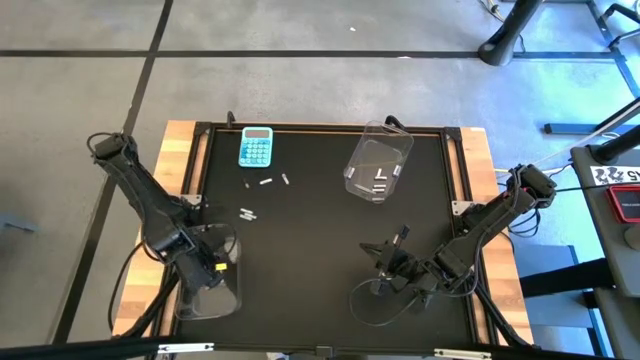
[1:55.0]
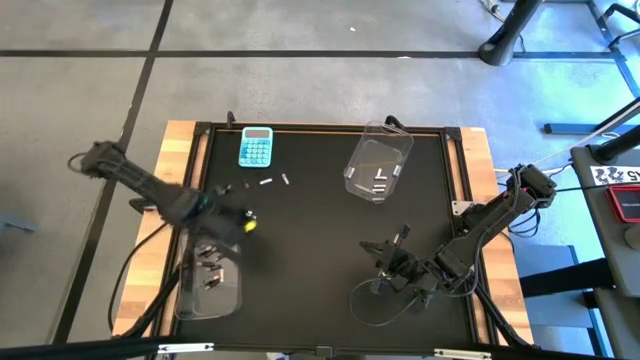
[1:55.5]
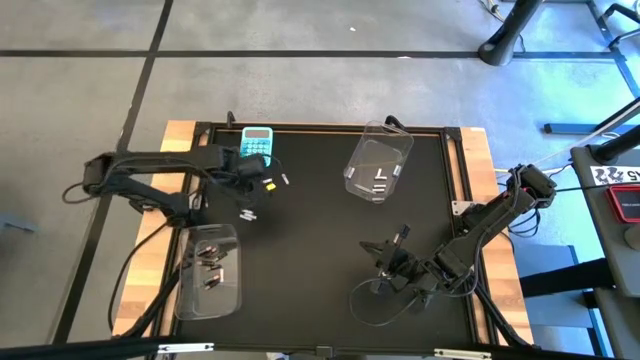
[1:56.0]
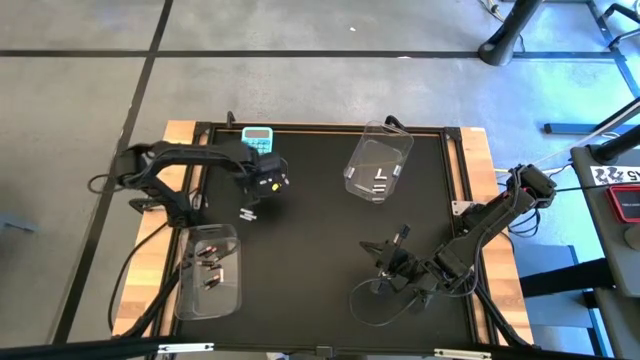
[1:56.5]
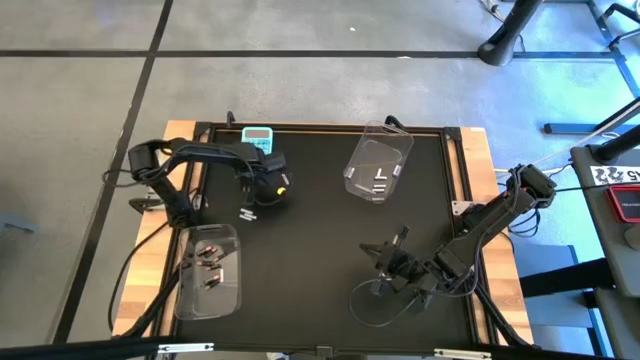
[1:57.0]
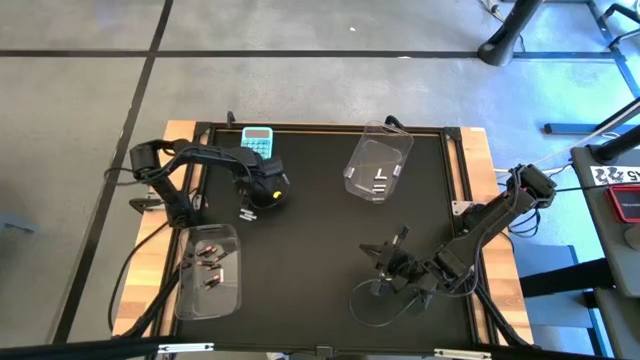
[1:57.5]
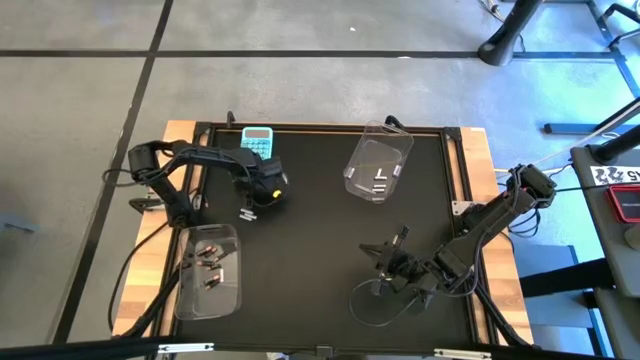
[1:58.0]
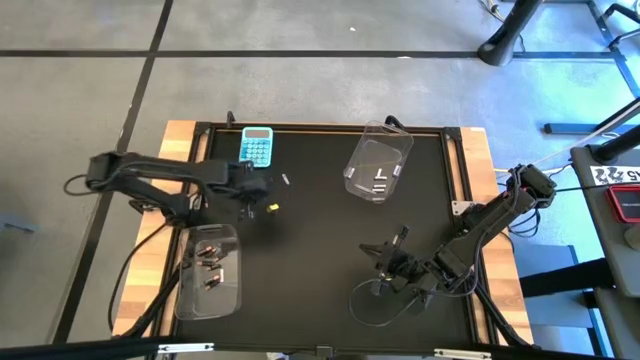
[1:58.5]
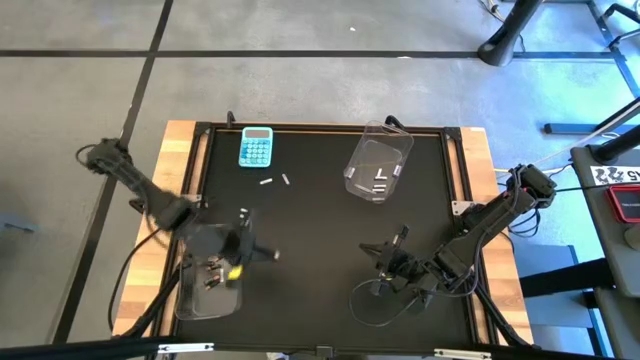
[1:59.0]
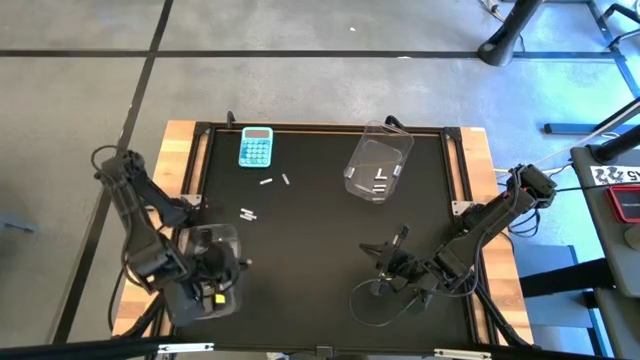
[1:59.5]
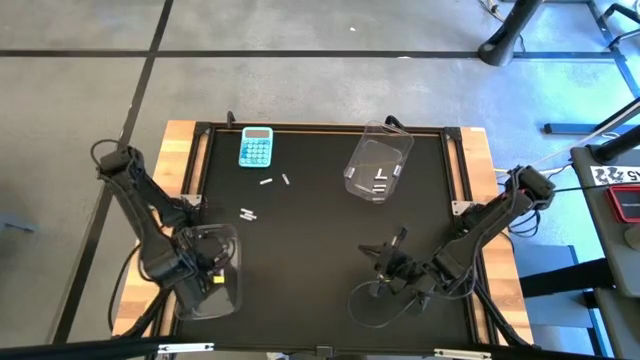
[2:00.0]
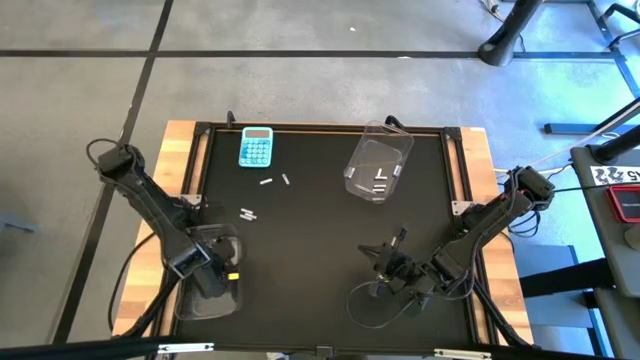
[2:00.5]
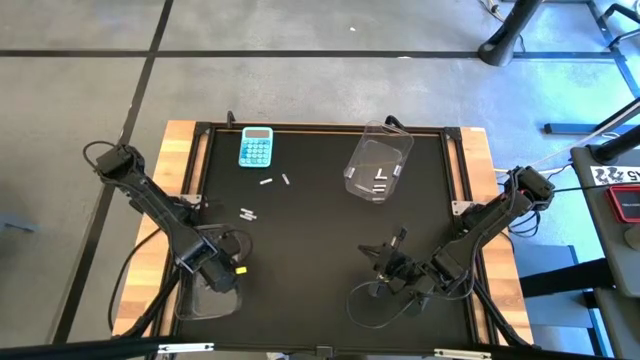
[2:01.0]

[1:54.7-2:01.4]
Task: Sort batteries
Put the black battery into the bottom transparent bin

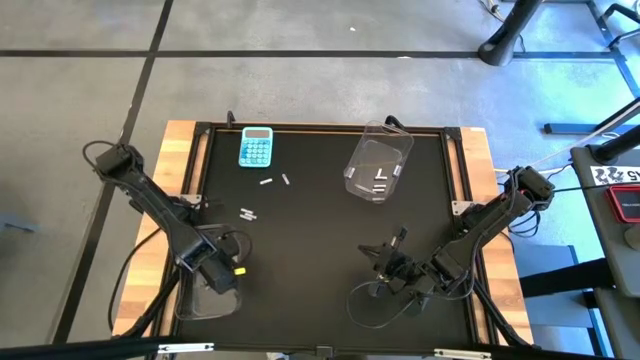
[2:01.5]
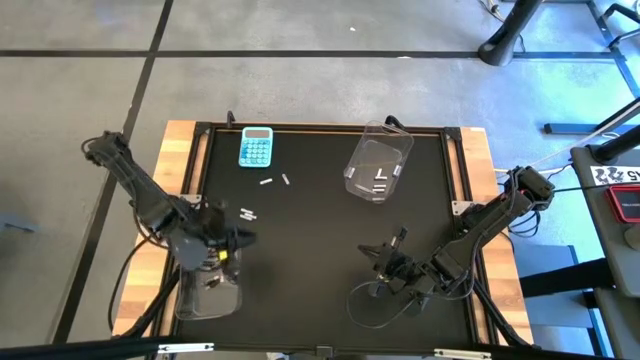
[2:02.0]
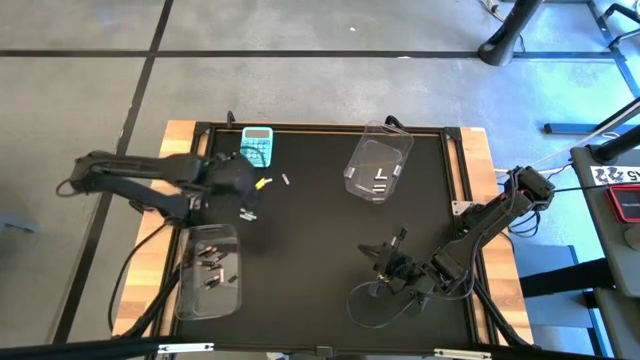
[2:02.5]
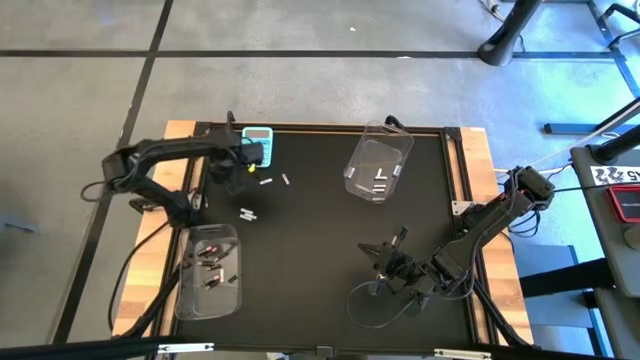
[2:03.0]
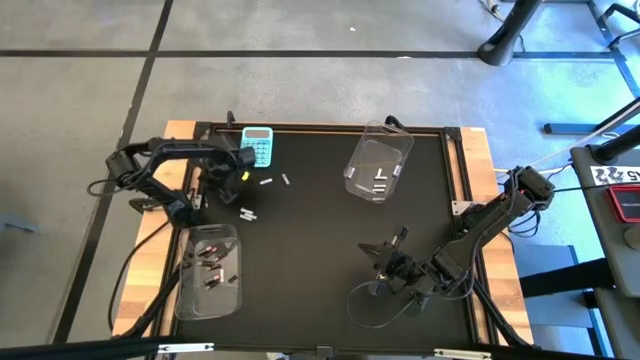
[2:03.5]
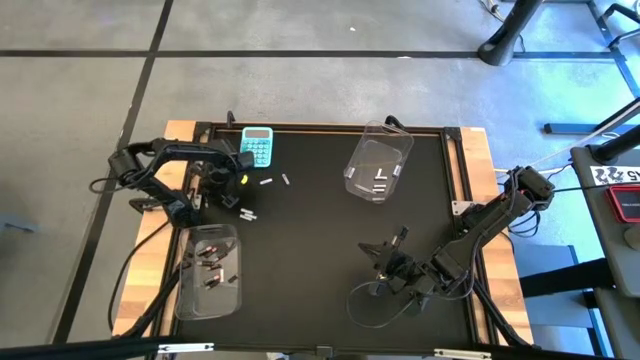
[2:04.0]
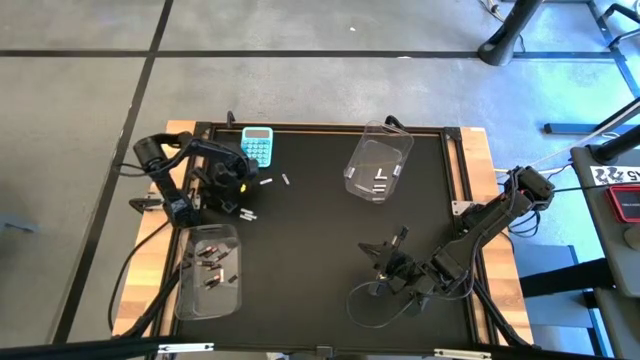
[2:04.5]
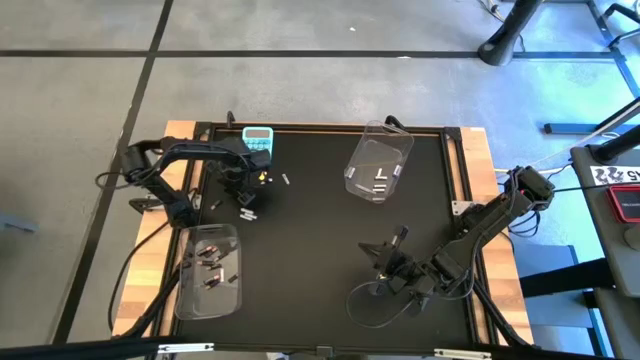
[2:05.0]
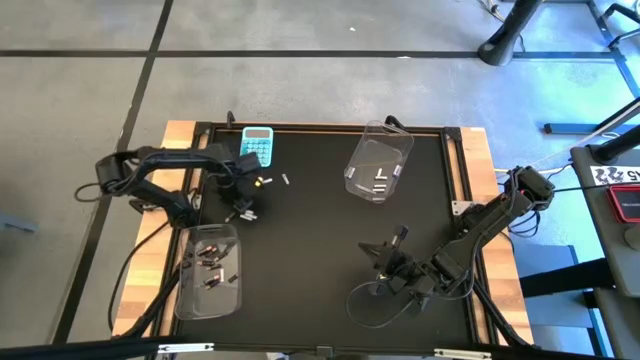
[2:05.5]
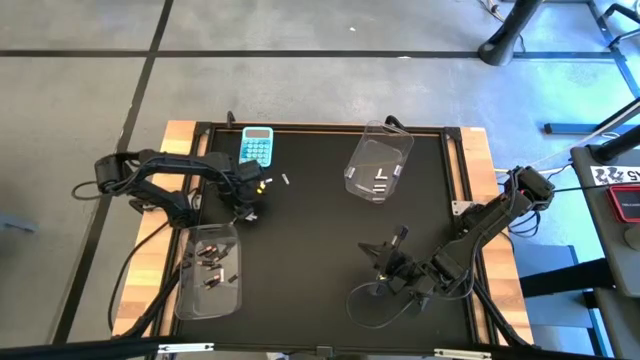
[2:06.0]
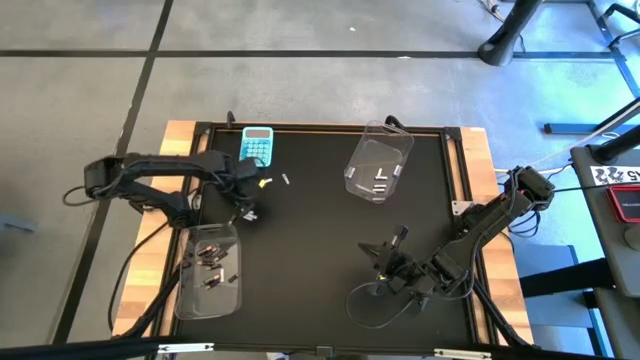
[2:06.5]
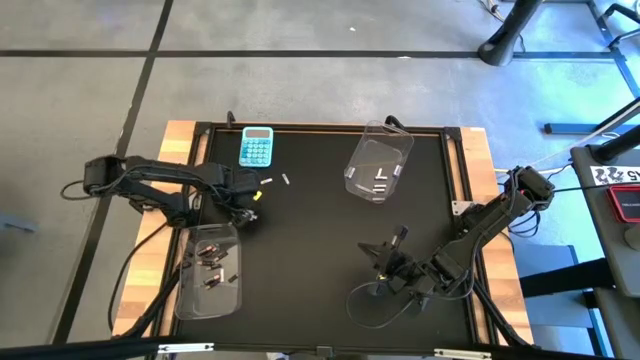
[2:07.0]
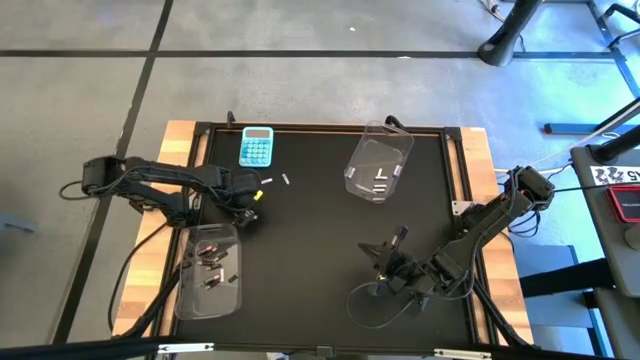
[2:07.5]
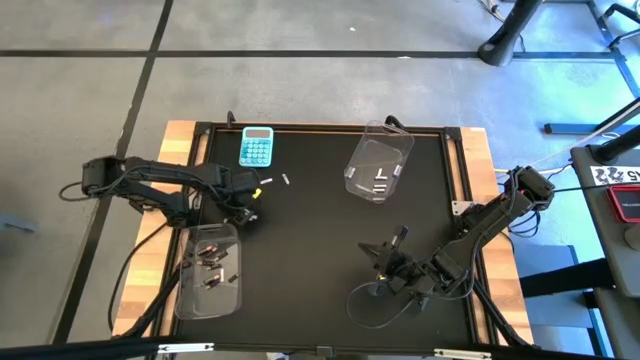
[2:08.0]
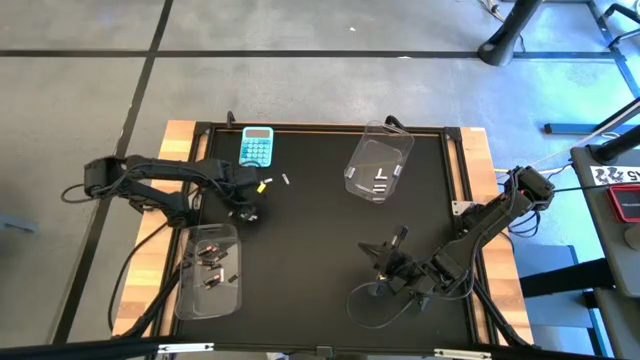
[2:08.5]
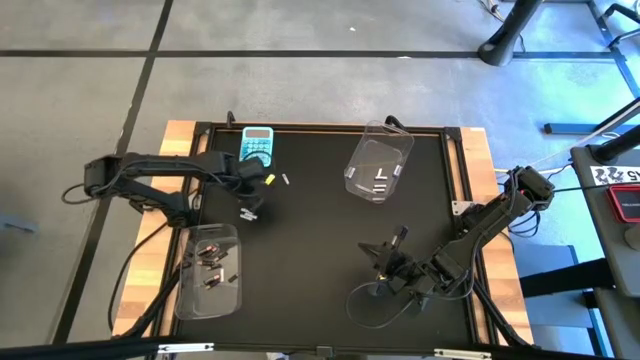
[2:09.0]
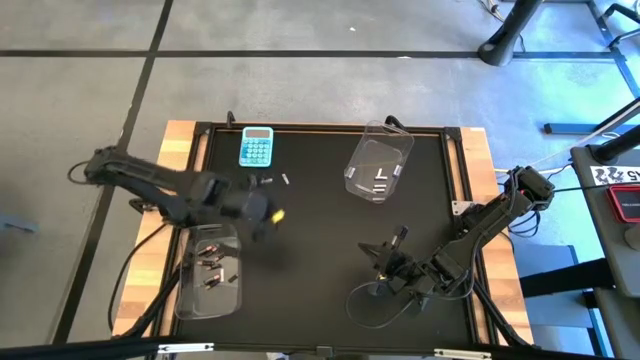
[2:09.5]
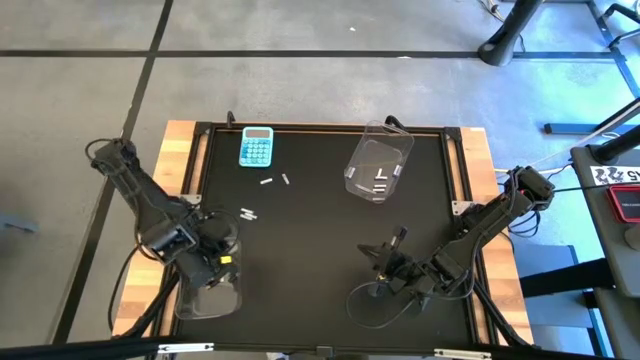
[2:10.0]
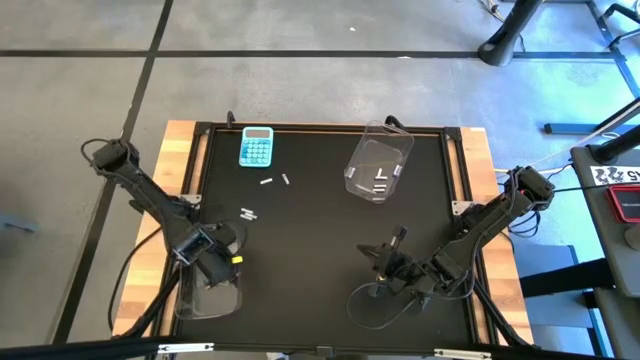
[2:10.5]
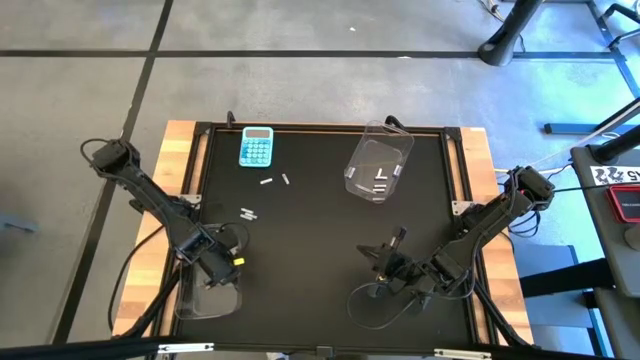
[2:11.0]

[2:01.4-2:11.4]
Put the black battery into the bottom transparent bin

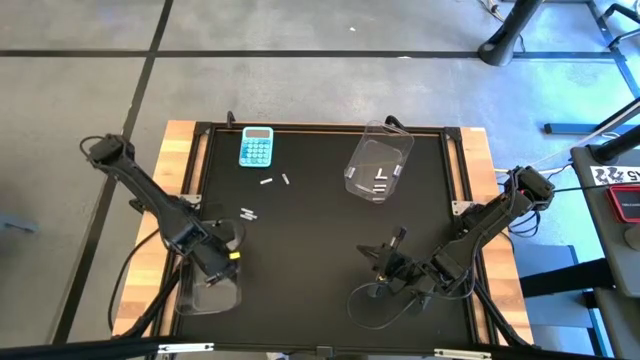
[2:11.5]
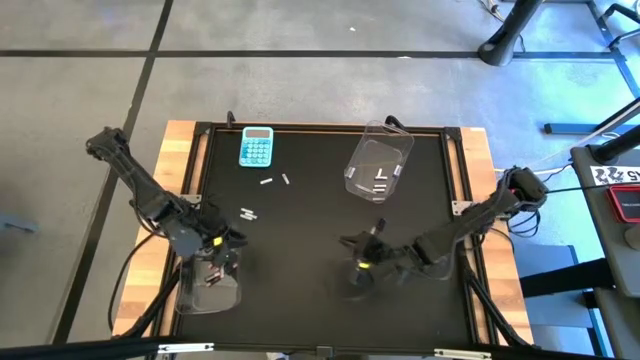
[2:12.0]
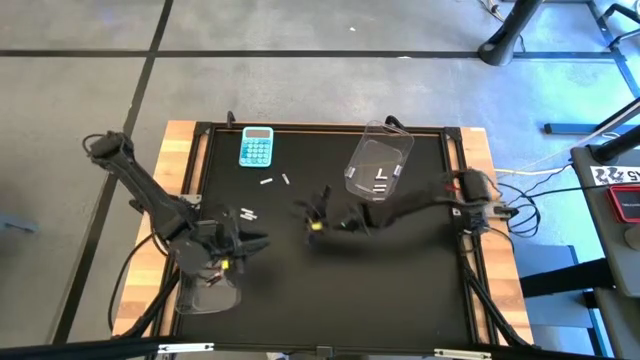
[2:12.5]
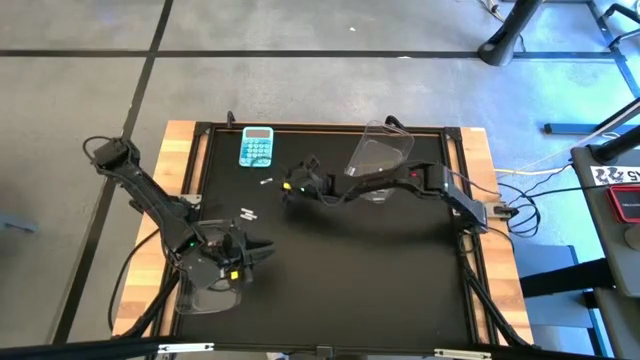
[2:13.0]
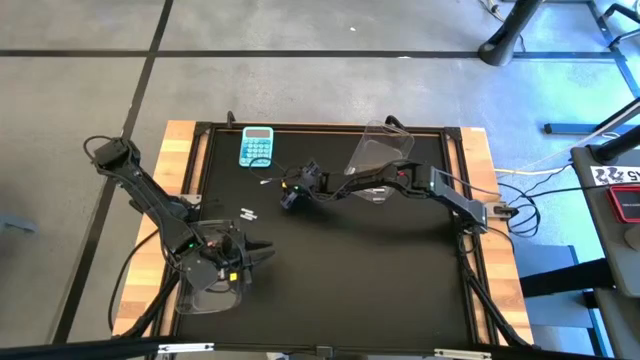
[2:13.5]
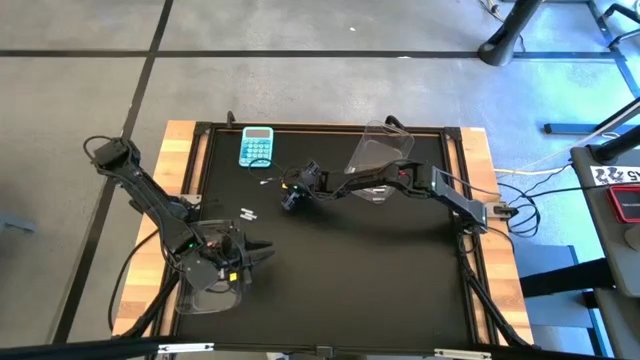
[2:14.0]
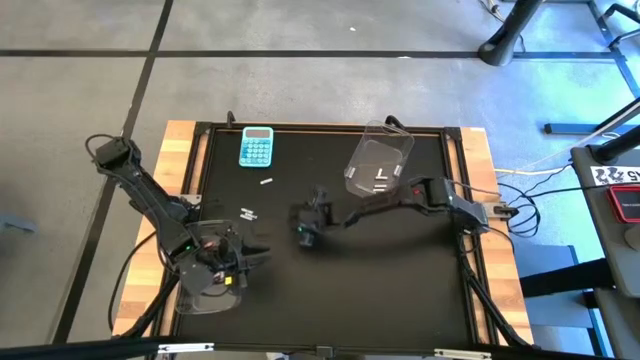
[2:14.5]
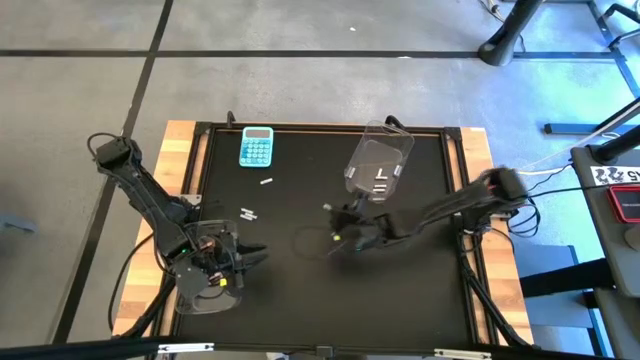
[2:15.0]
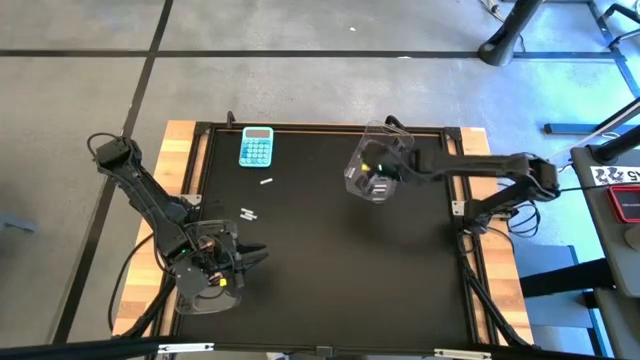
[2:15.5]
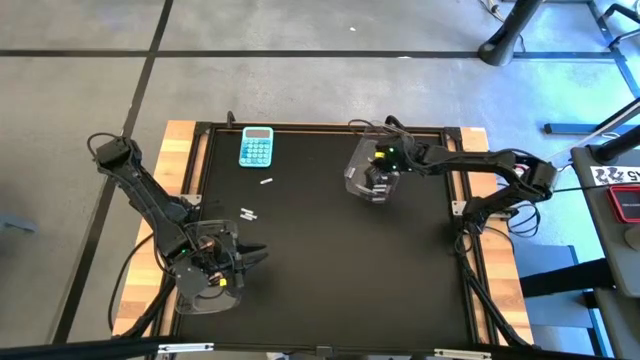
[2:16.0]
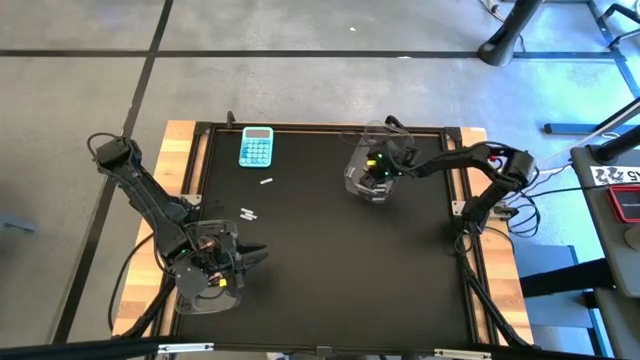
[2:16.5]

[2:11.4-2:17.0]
Put the white battery into the top transparent bin
